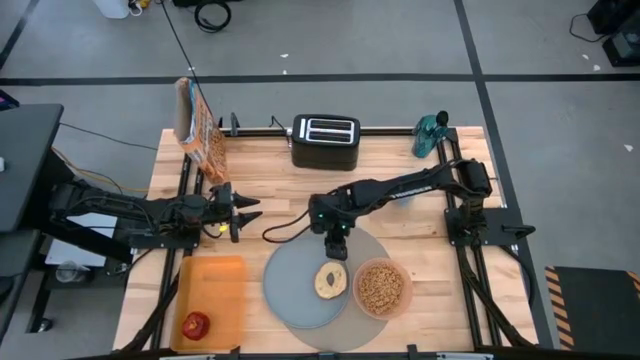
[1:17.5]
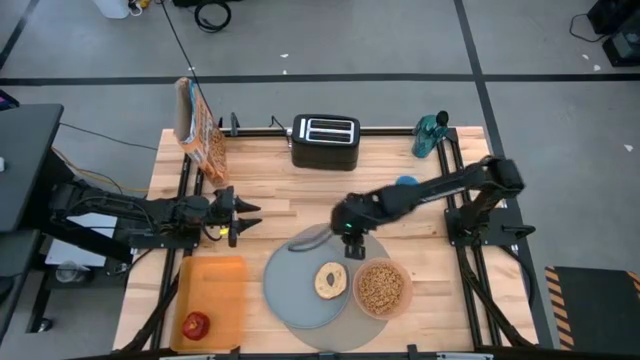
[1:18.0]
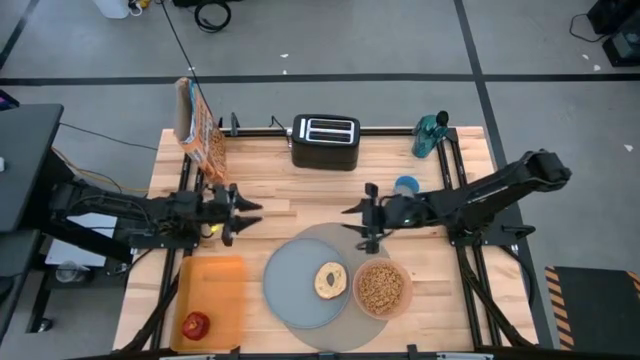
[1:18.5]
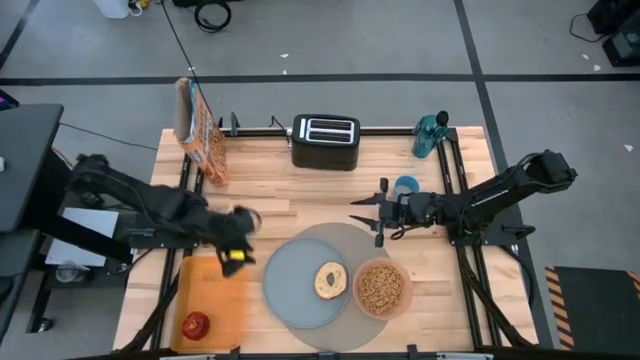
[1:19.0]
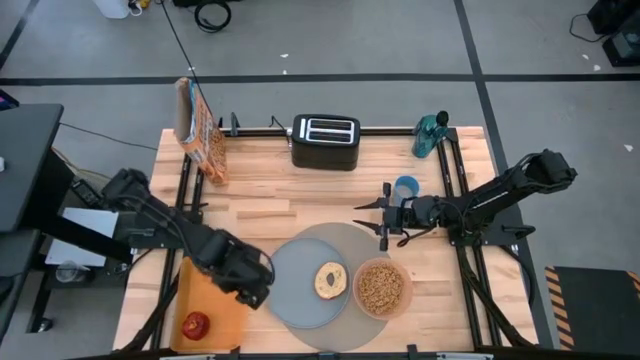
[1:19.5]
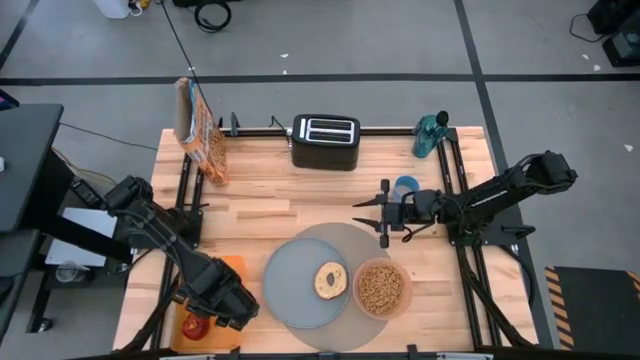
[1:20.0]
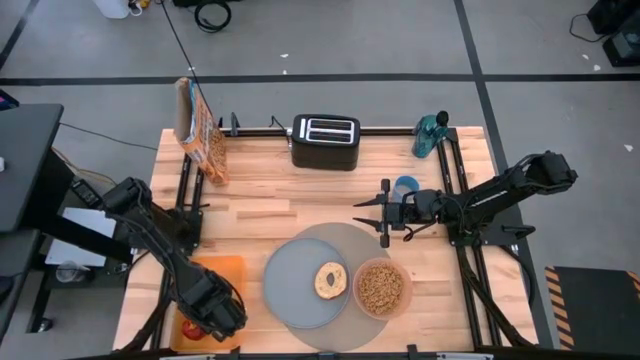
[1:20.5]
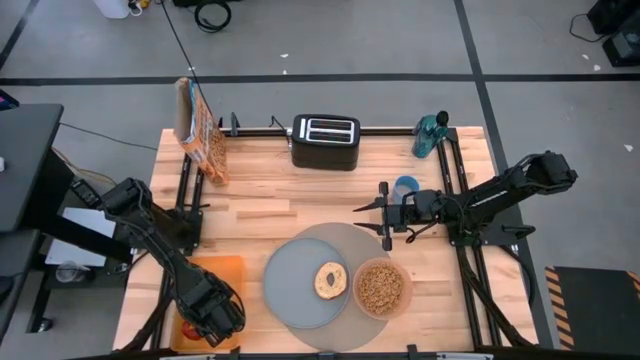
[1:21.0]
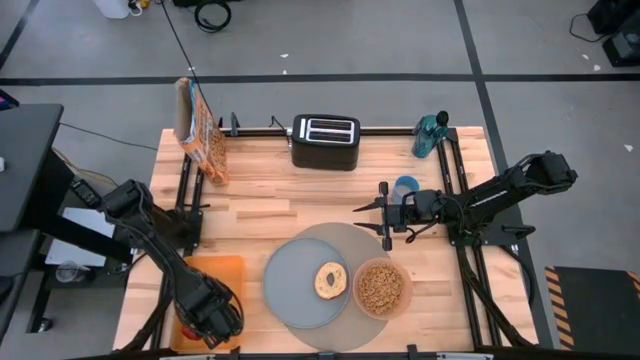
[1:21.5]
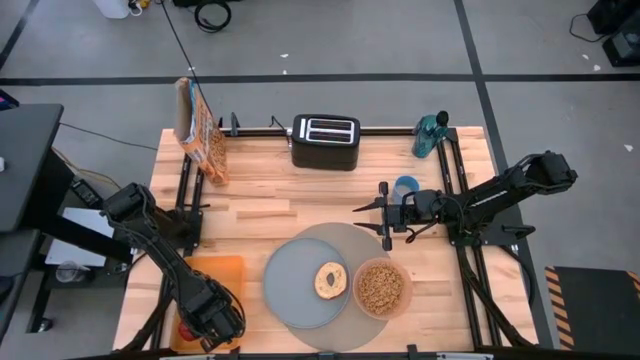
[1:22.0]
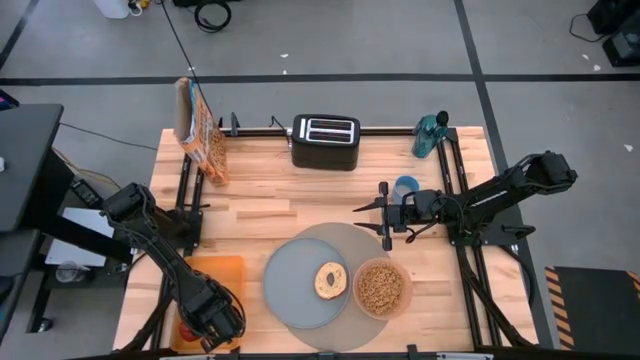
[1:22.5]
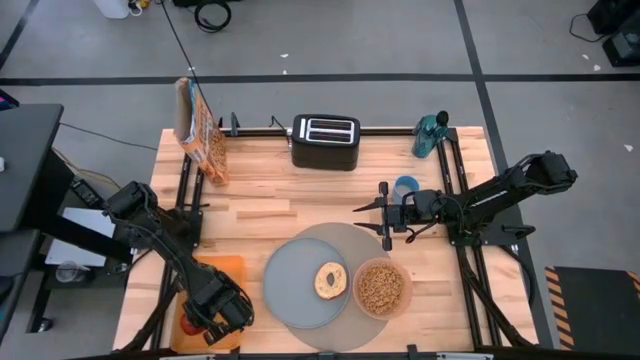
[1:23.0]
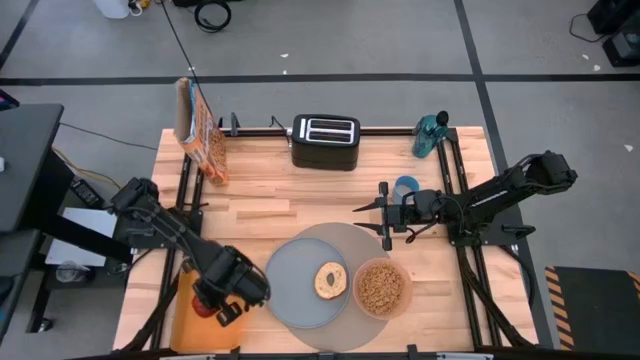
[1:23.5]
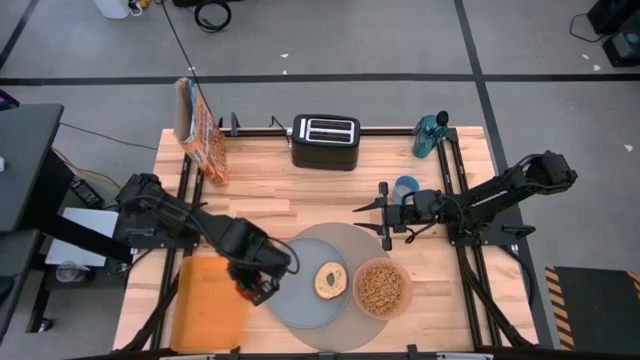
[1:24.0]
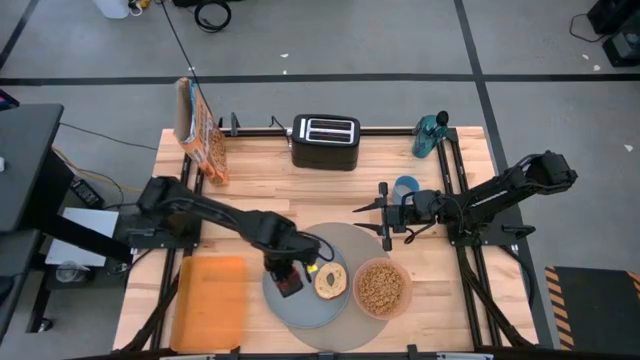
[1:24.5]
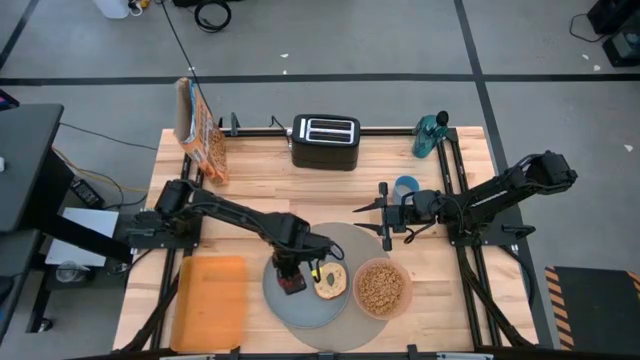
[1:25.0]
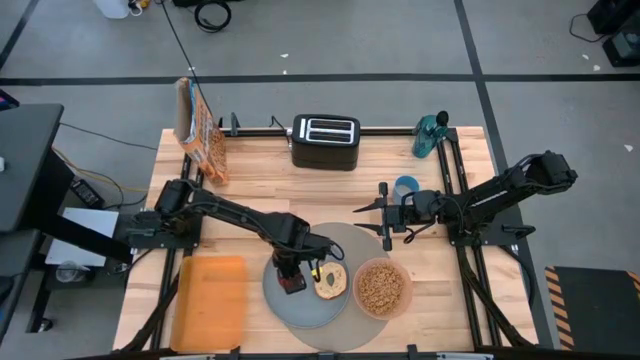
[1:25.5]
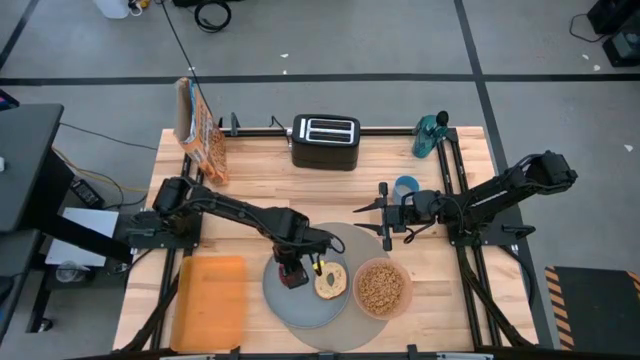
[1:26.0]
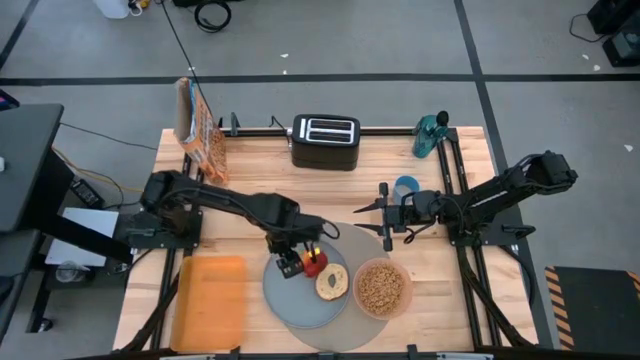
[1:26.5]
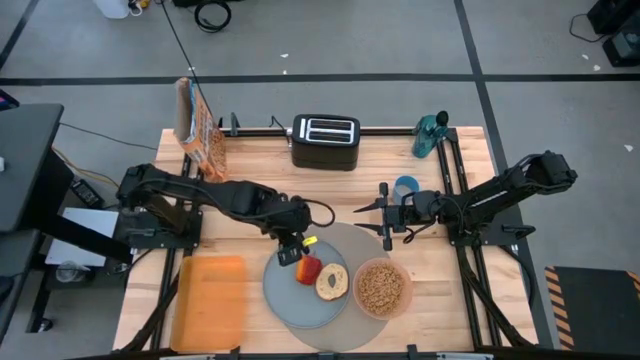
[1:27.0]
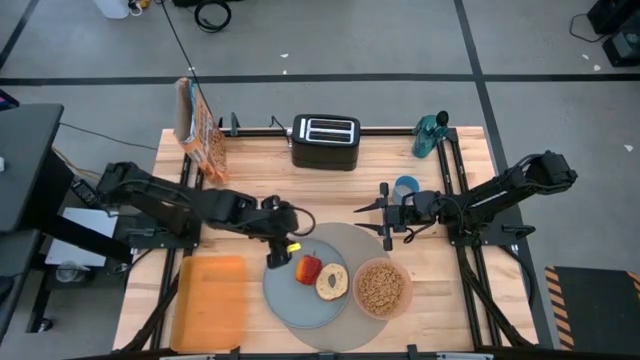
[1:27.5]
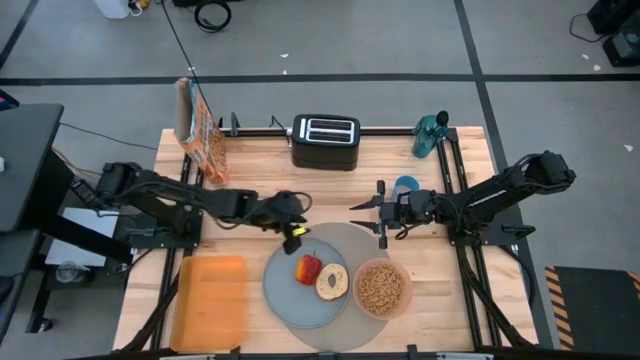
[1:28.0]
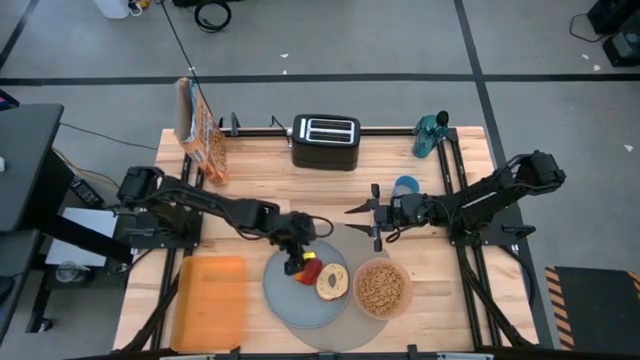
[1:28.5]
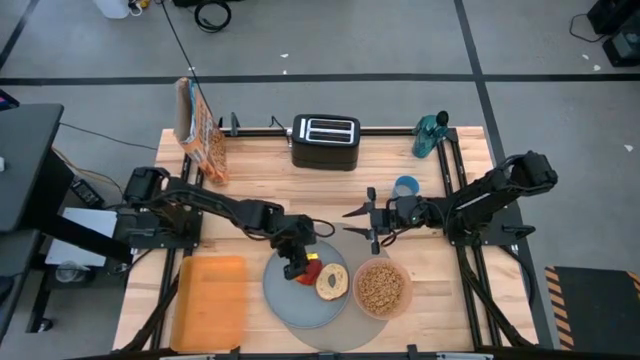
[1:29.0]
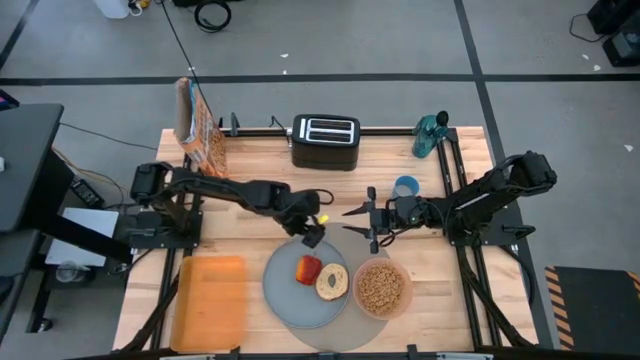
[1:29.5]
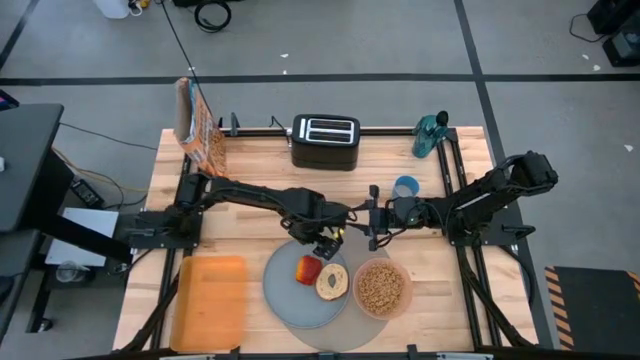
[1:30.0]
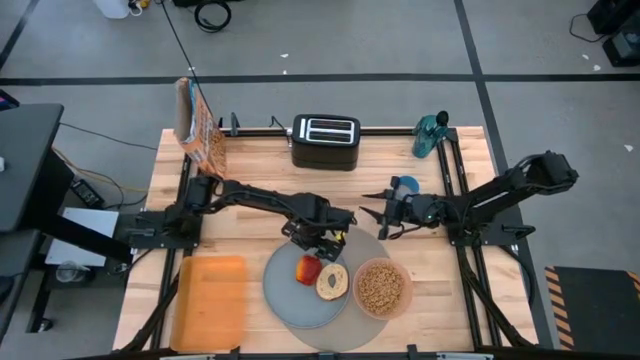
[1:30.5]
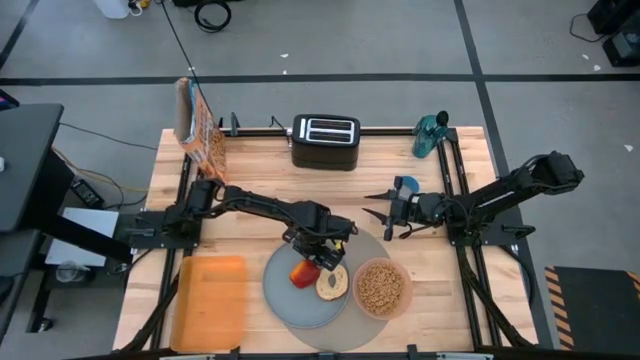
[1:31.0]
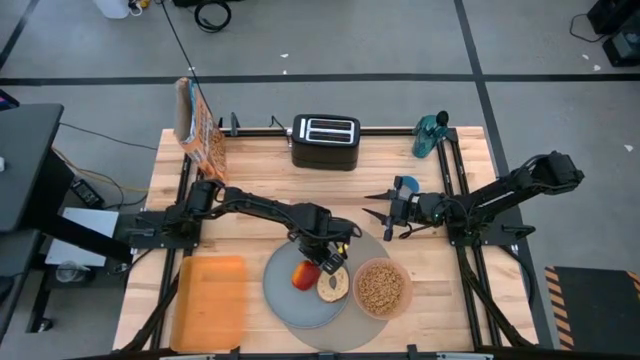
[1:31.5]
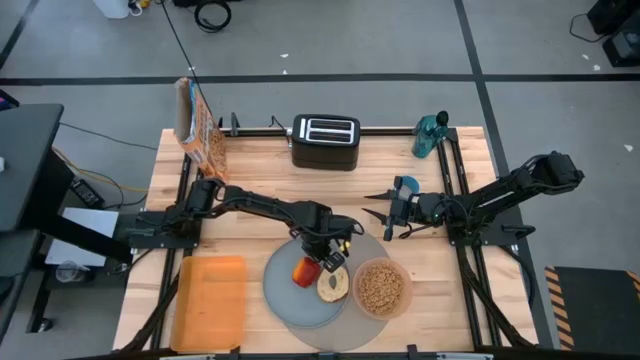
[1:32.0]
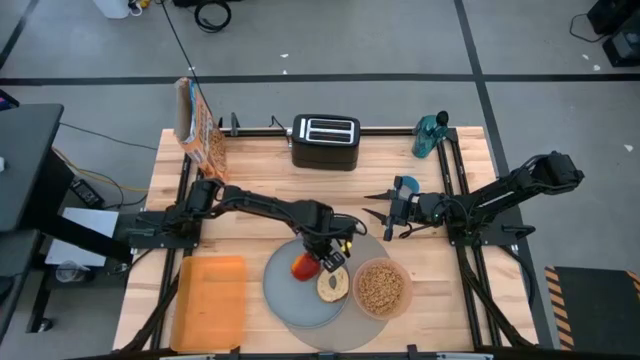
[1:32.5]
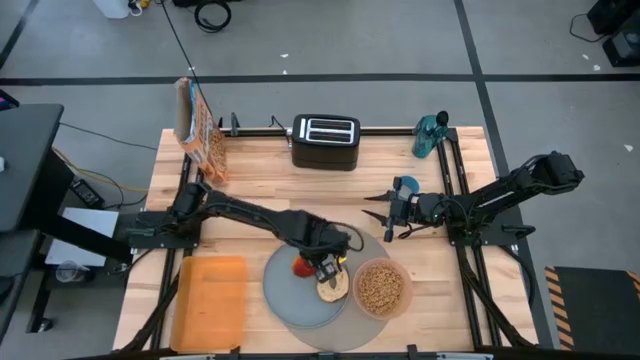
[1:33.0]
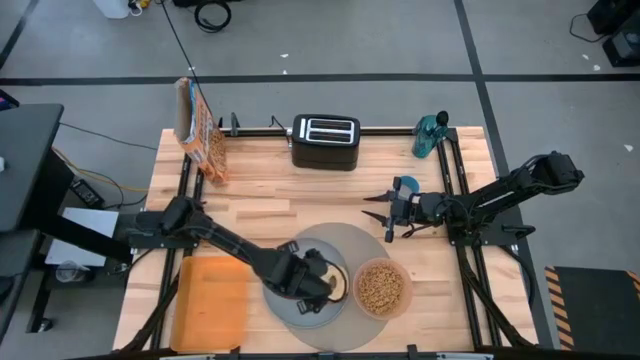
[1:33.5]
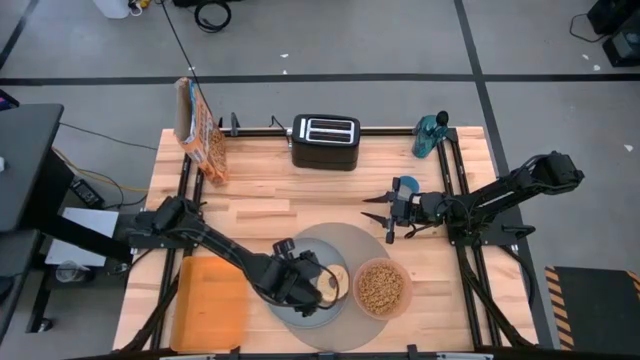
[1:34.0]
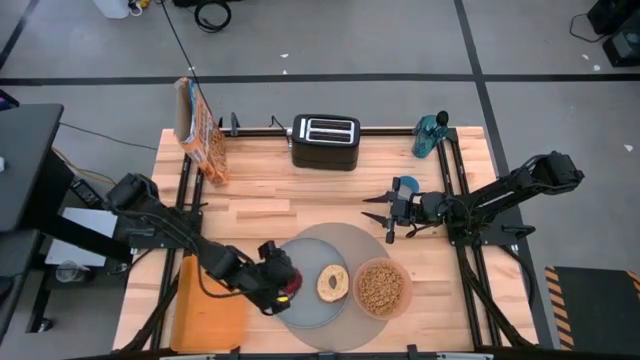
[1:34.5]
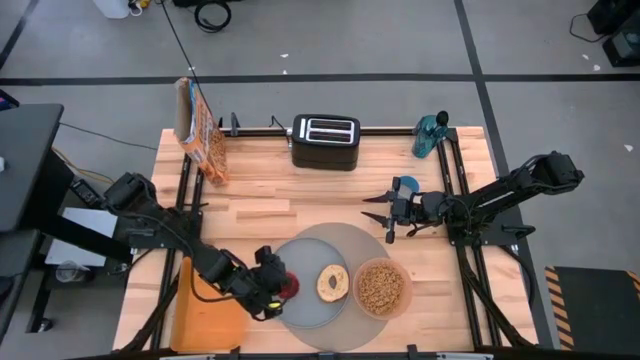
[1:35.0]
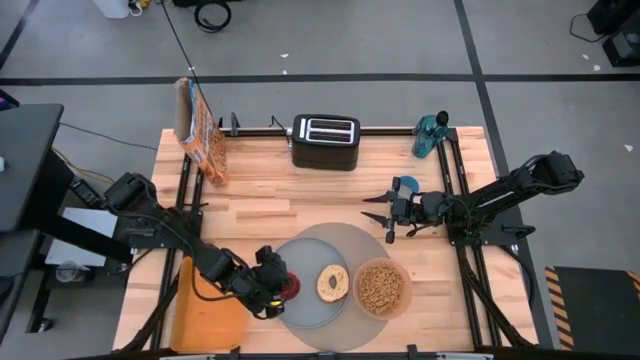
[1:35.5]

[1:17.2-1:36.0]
Task: Arrange a breakfast setting
Put apple on the blue plate

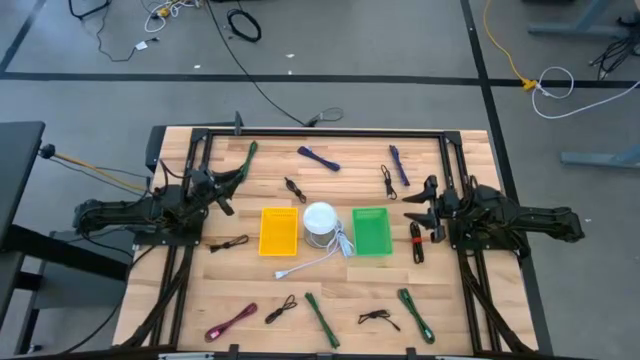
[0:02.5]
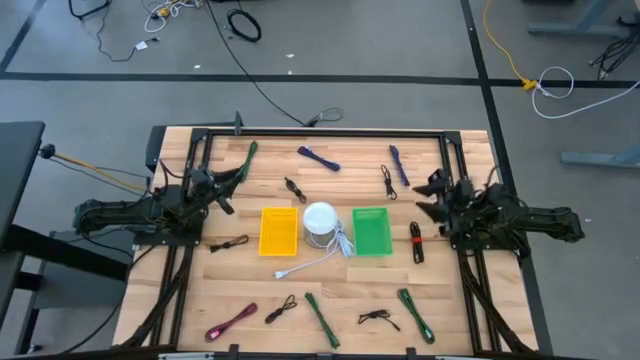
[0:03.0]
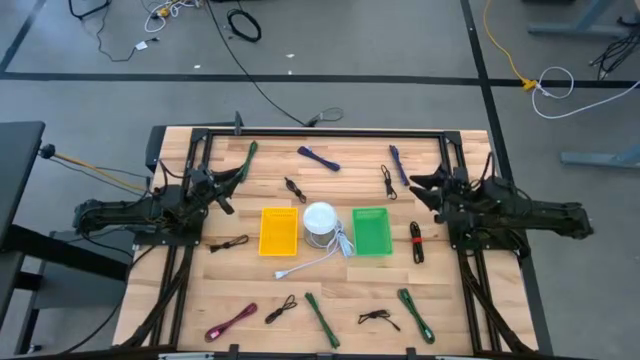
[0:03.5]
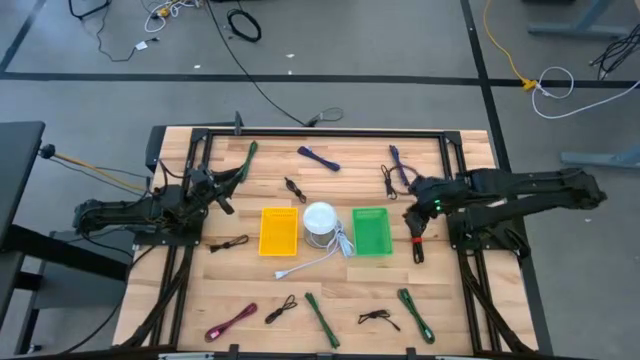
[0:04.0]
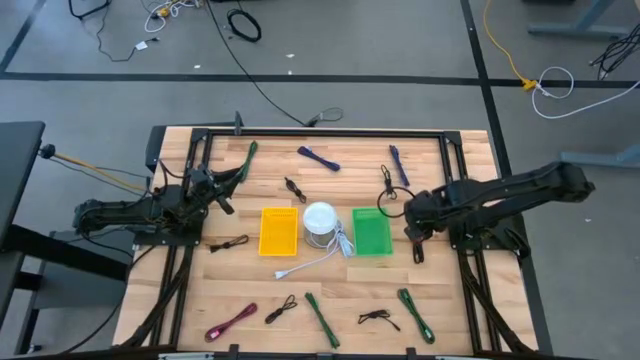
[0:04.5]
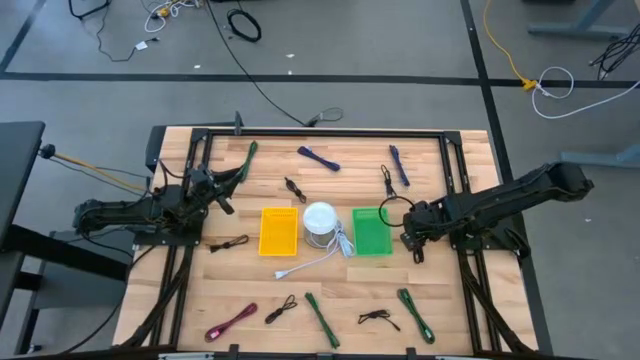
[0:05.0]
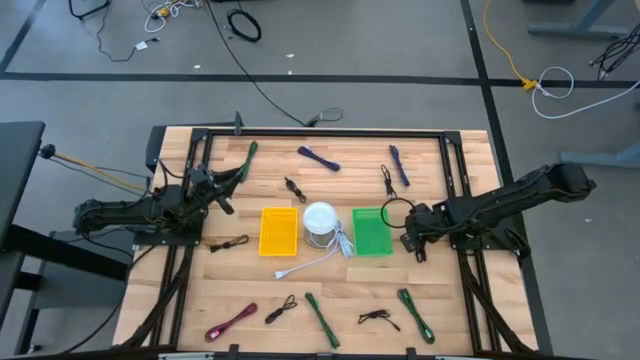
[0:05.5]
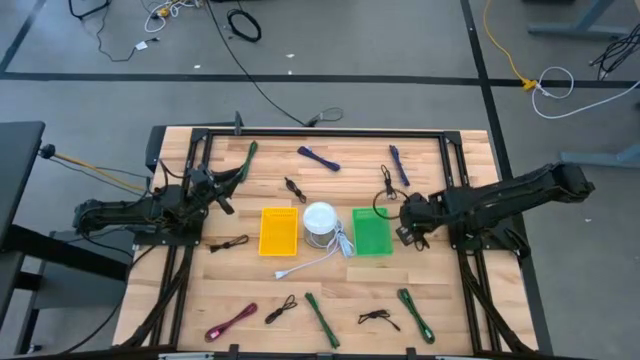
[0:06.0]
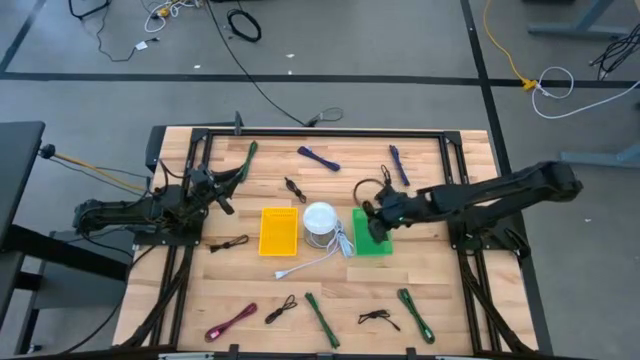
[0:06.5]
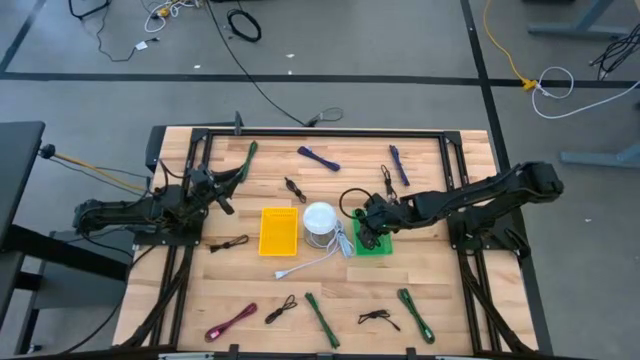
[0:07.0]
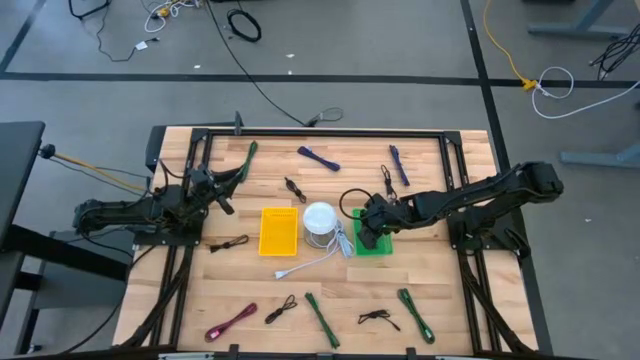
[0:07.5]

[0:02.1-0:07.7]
Task: Pick & Place USB Port
Put the black charger cable into the green basket
